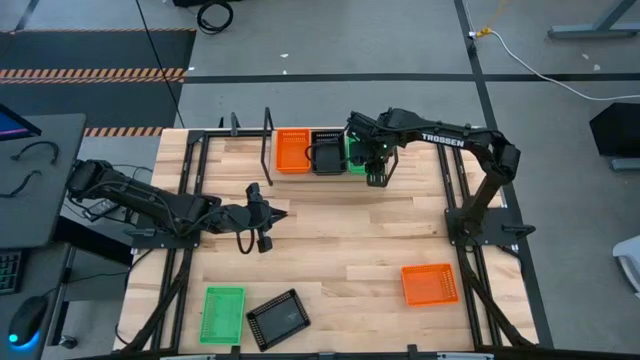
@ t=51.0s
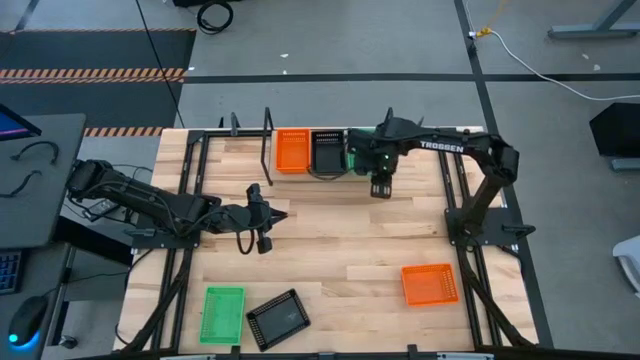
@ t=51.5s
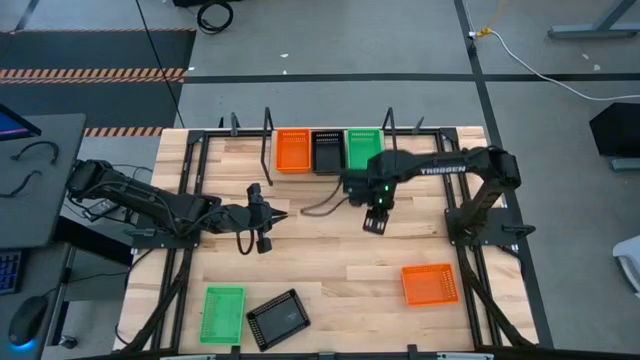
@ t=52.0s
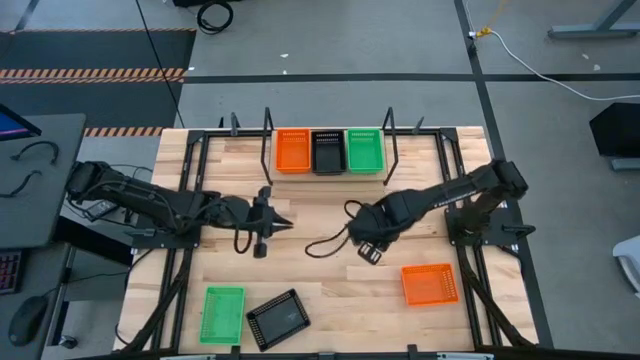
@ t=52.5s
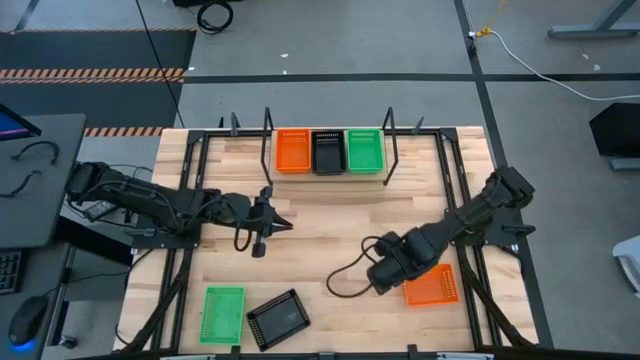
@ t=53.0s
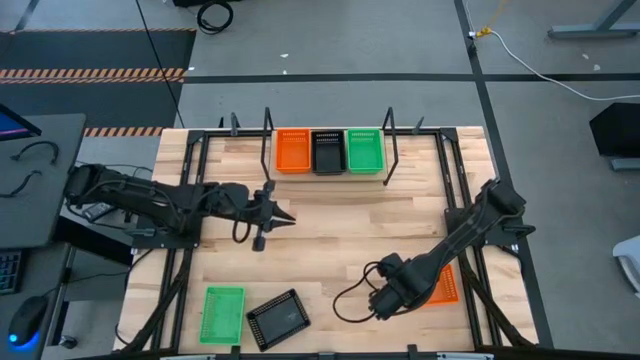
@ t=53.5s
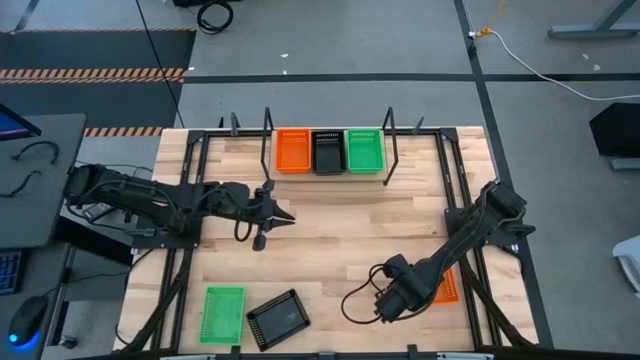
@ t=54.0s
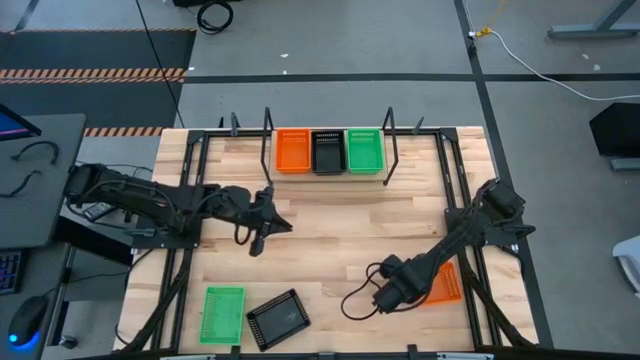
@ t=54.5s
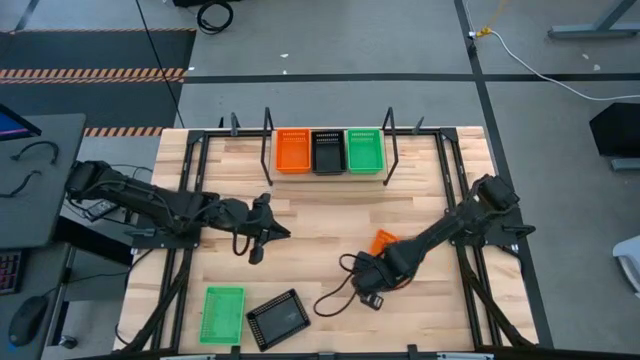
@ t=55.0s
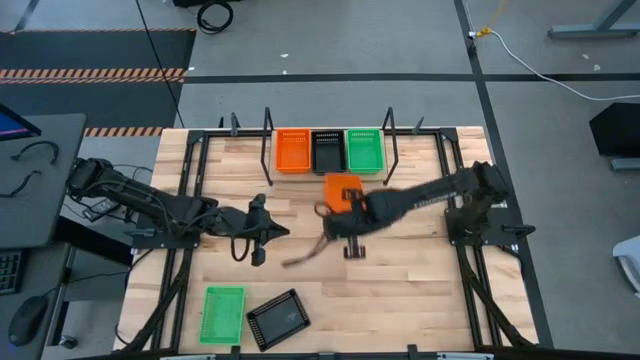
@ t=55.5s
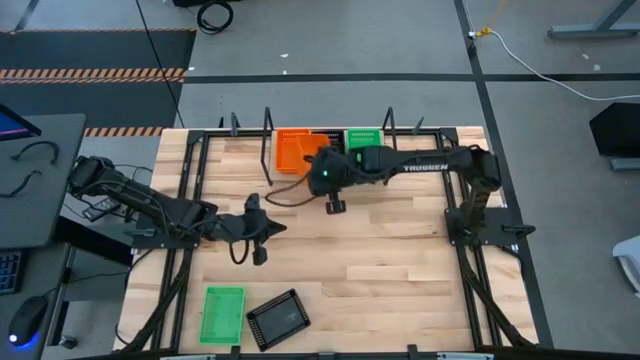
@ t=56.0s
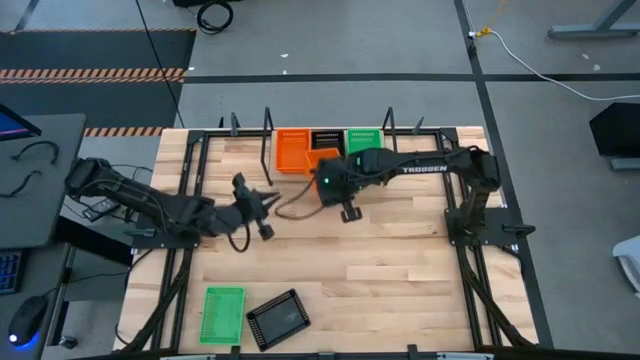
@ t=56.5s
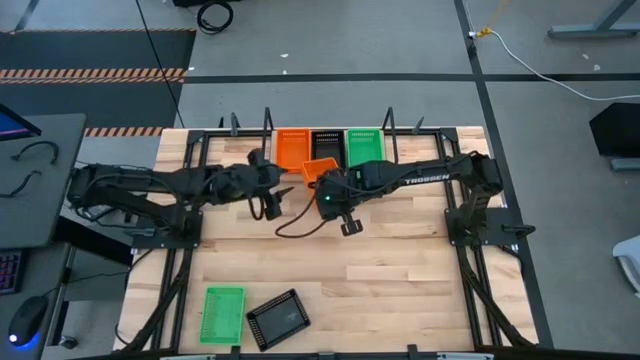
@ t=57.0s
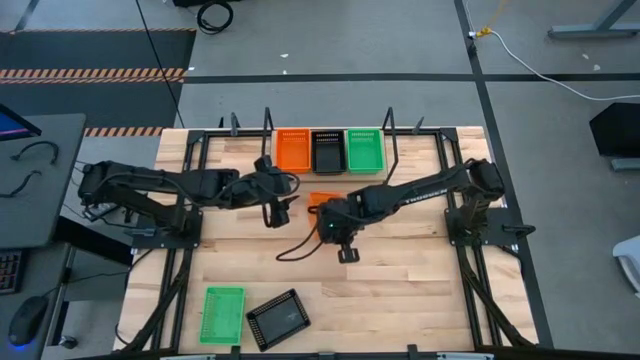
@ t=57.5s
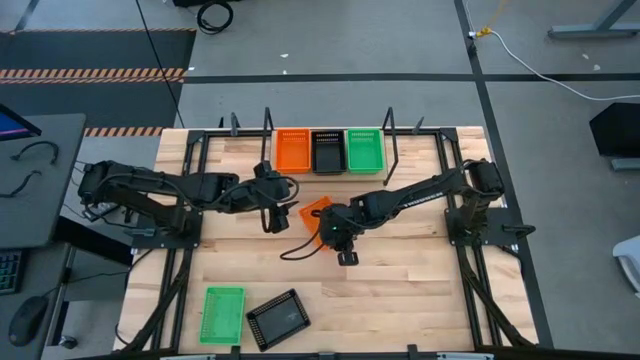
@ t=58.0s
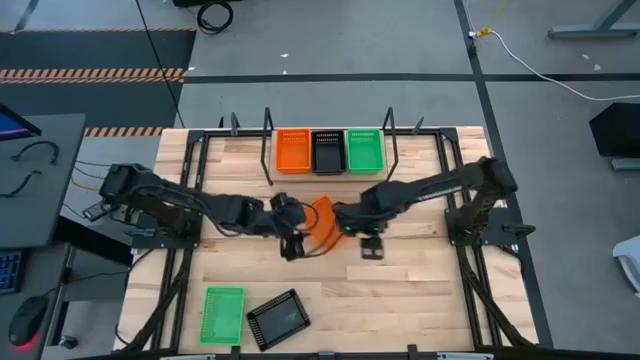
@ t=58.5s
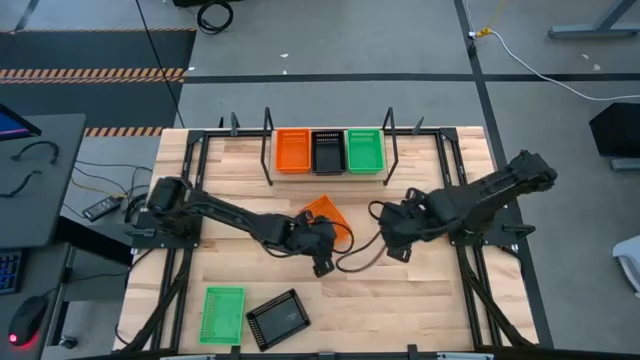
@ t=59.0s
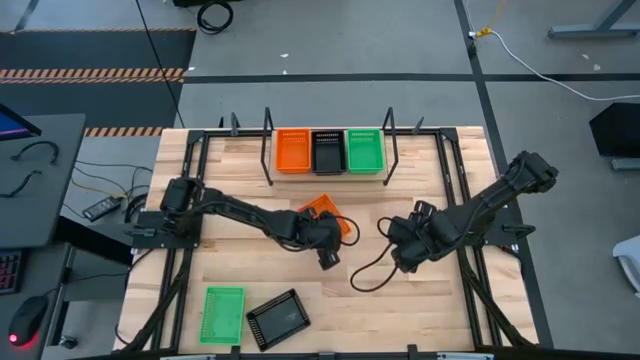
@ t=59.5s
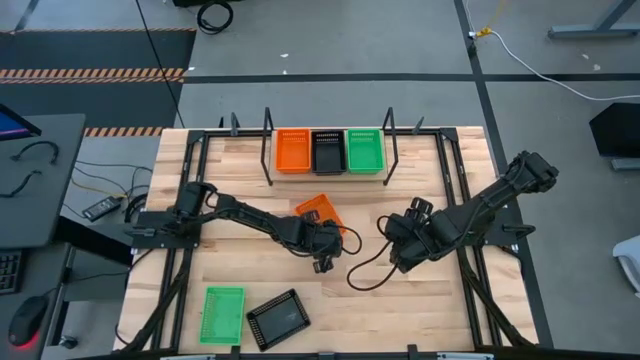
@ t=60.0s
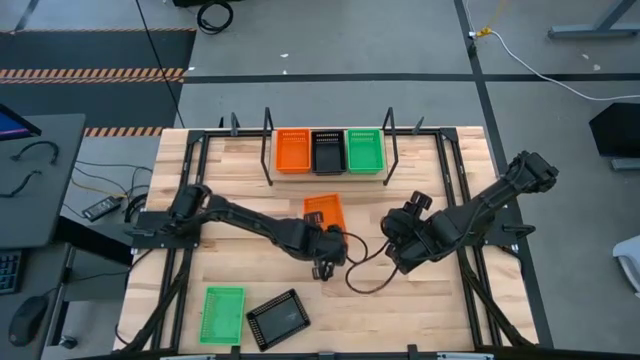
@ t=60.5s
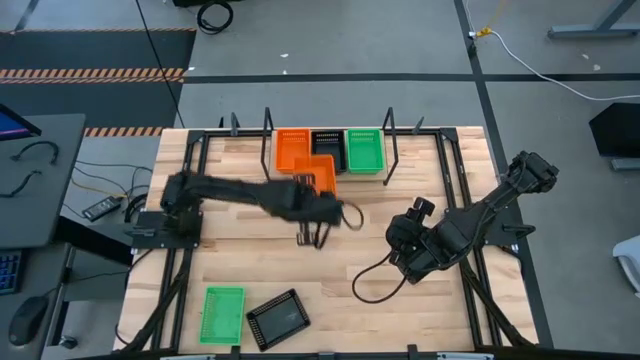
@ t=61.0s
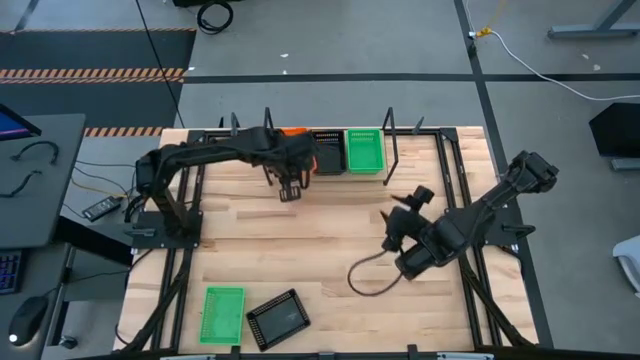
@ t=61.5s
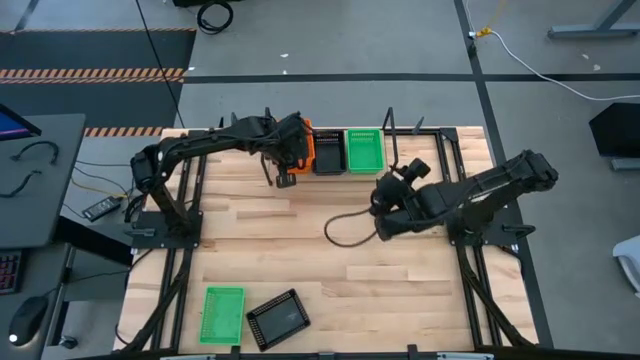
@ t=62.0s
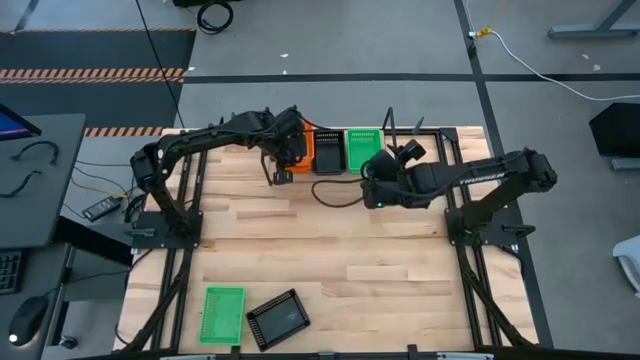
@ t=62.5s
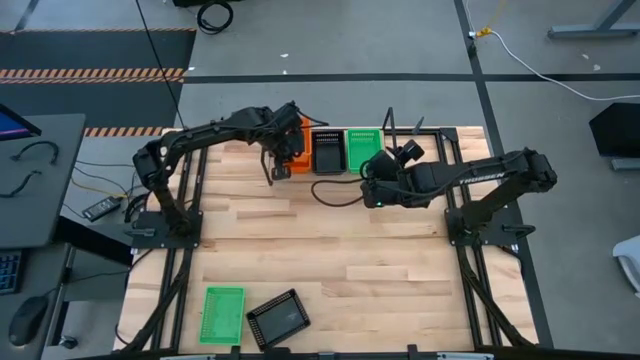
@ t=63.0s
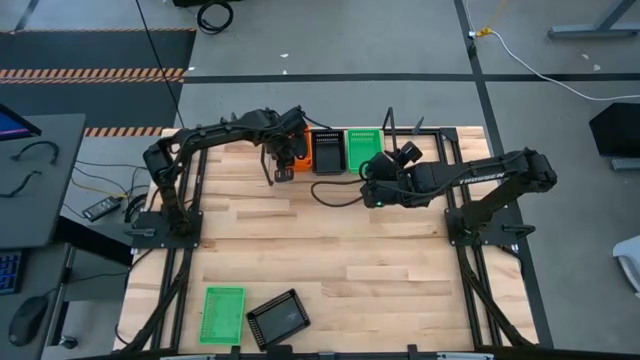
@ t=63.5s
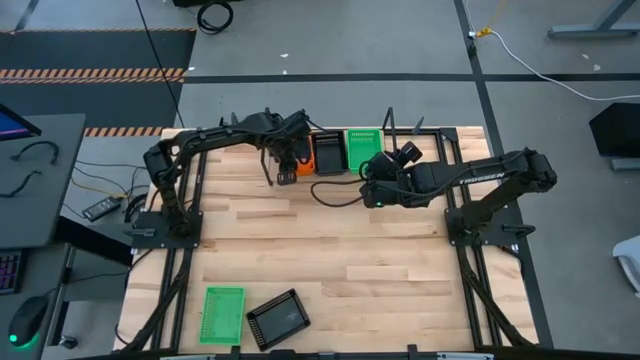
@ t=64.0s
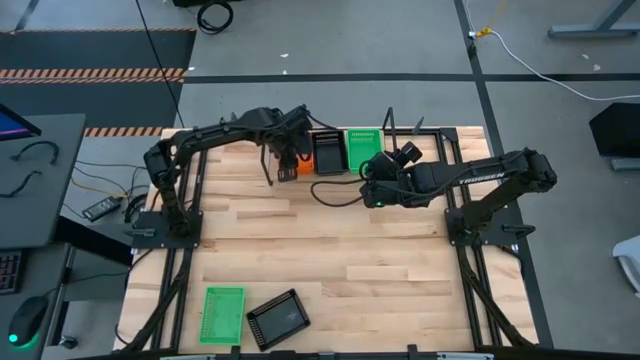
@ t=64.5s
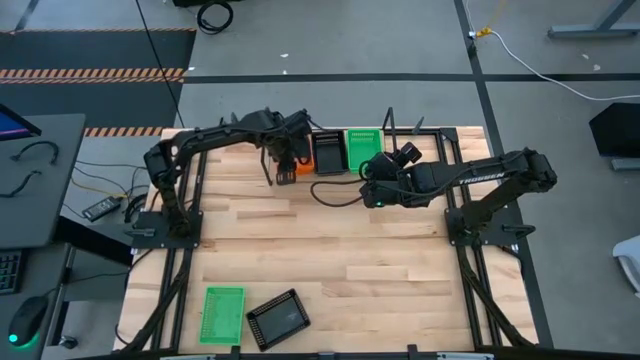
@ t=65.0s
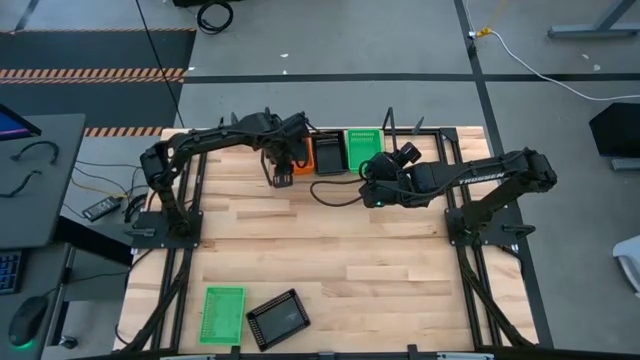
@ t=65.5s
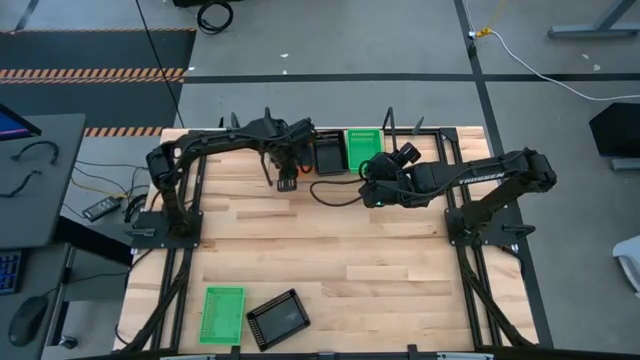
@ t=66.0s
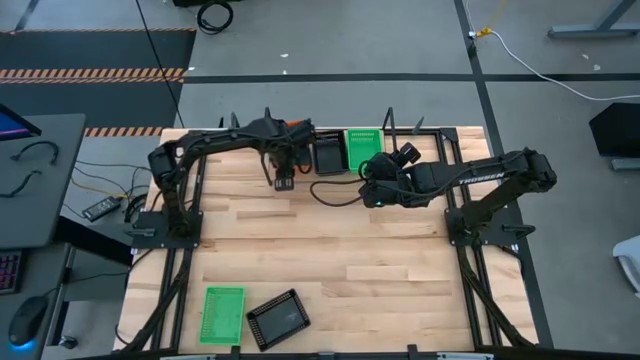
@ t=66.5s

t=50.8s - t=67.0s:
Task: Stack baskets on shelf by color
Stack the orange bin on top of the other orange bins on the shelf

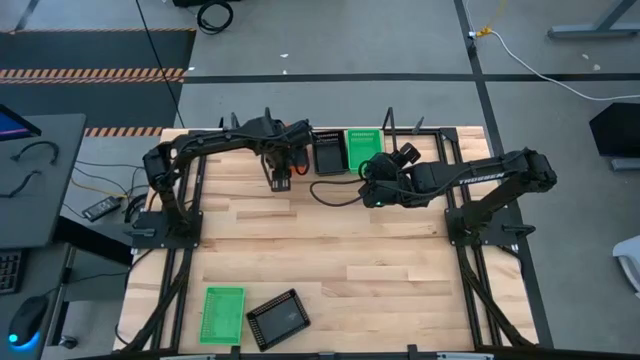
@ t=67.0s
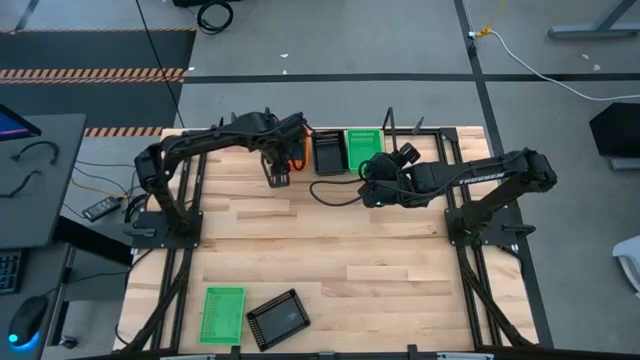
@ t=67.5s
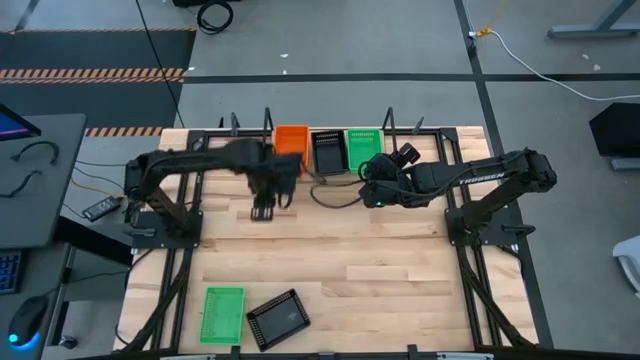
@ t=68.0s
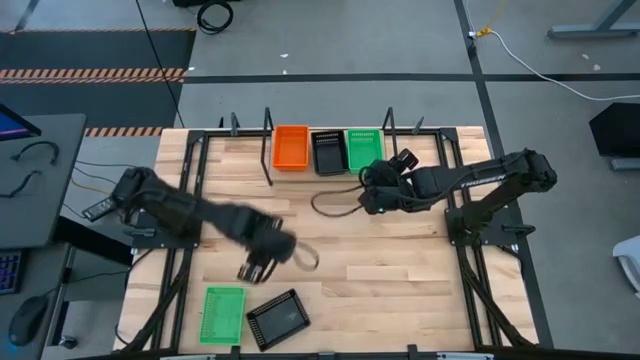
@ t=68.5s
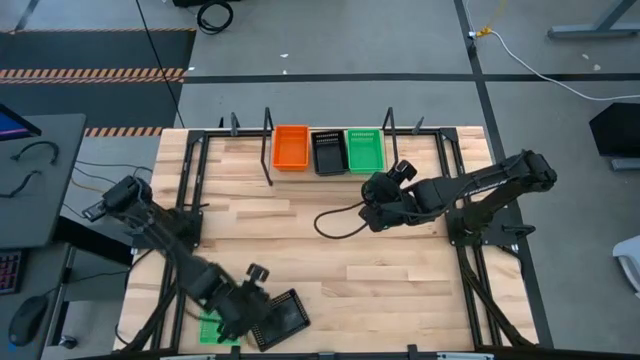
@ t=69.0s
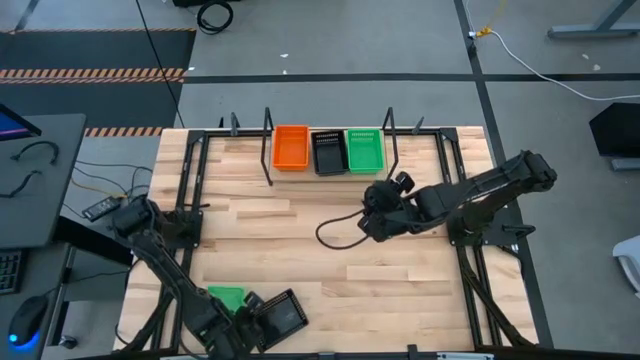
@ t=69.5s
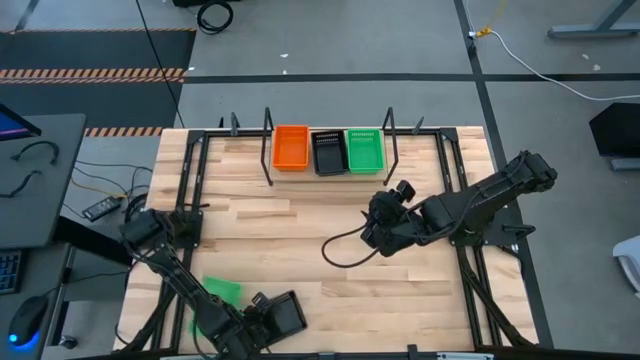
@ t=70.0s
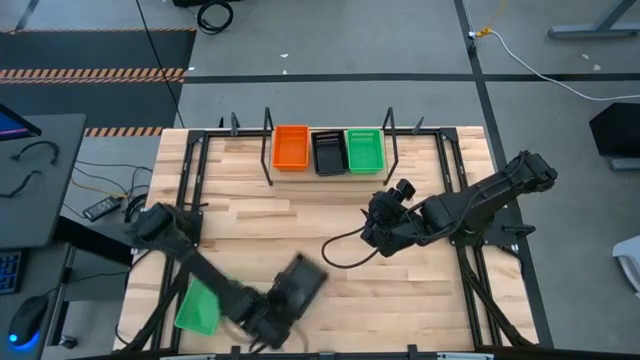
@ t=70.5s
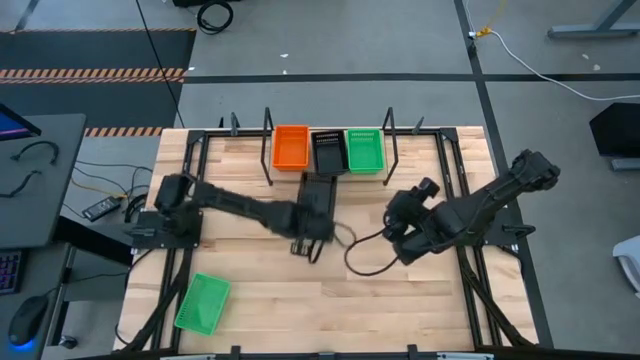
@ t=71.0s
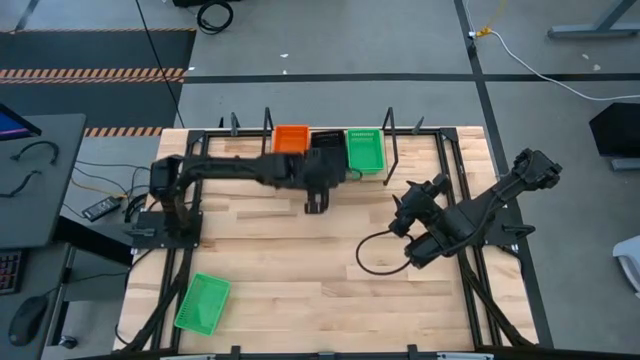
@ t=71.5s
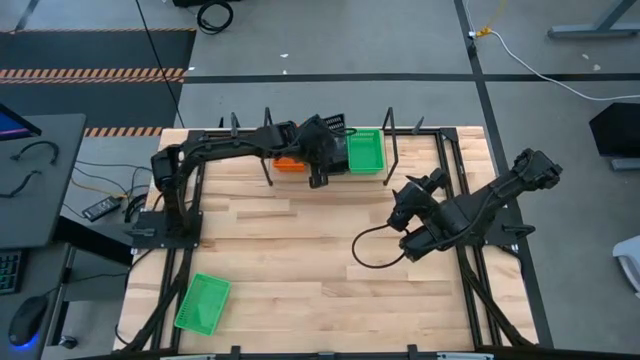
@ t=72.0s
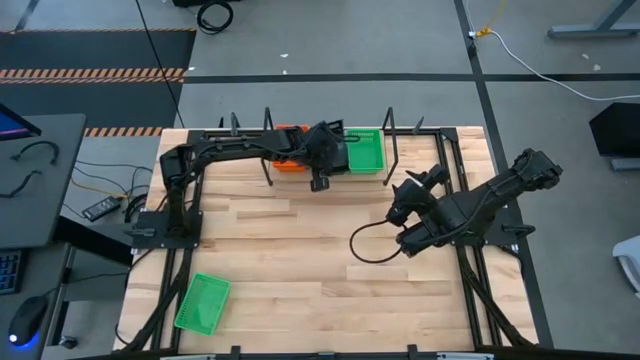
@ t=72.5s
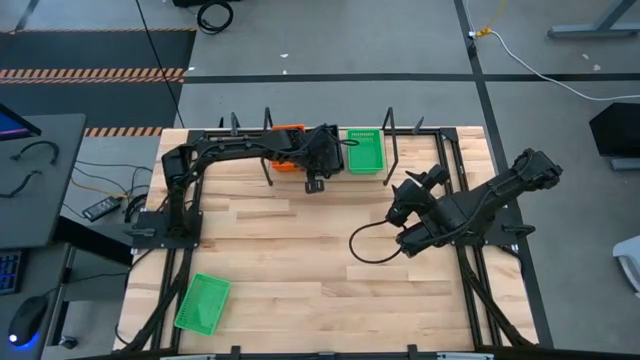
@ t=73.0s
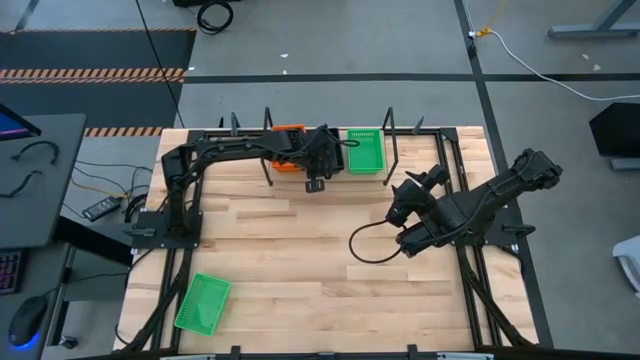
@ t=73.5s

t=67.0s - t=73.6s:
Stack the black bin on top of the other black bins on the shelf
